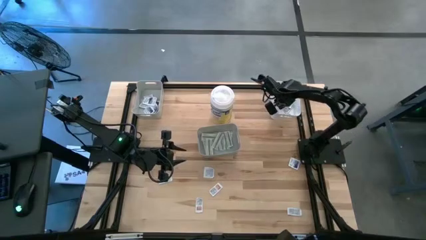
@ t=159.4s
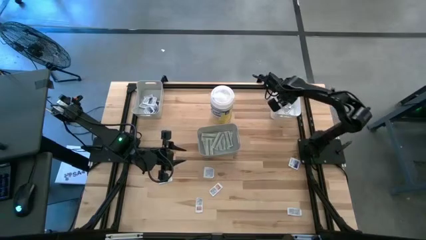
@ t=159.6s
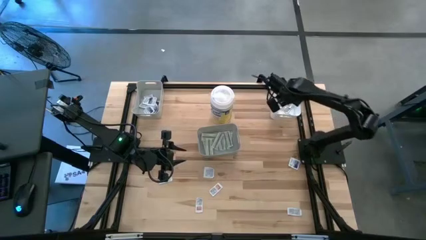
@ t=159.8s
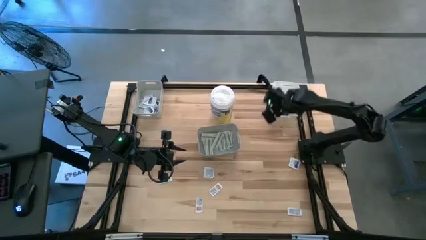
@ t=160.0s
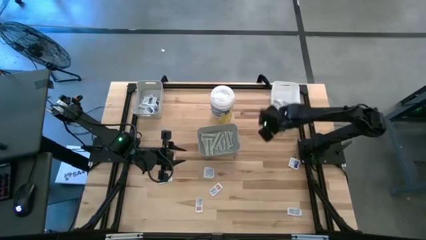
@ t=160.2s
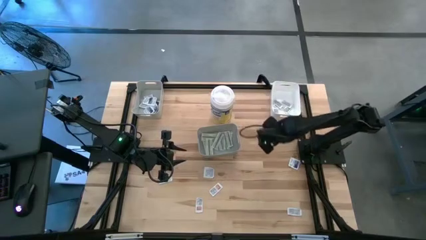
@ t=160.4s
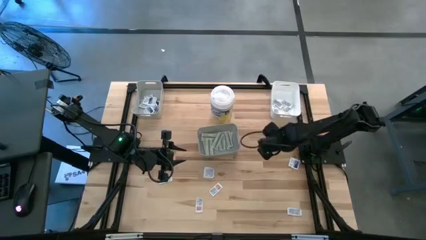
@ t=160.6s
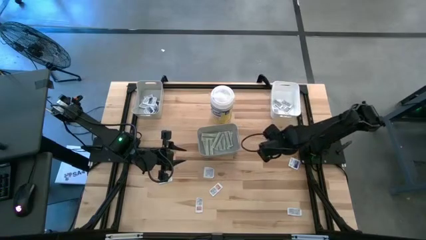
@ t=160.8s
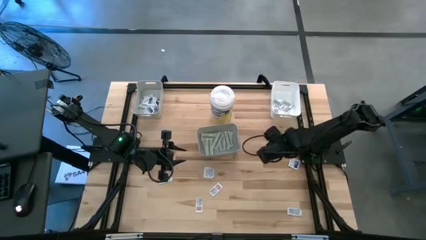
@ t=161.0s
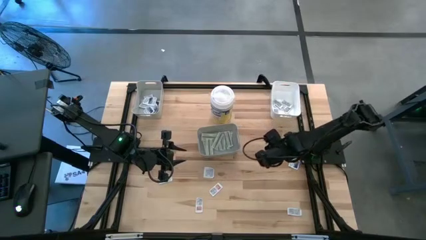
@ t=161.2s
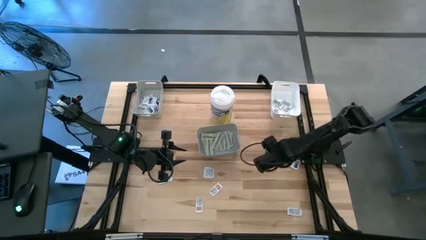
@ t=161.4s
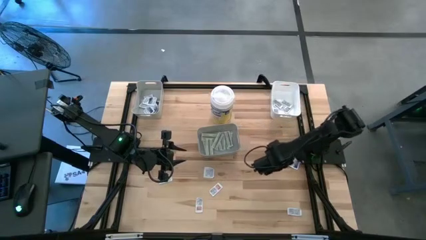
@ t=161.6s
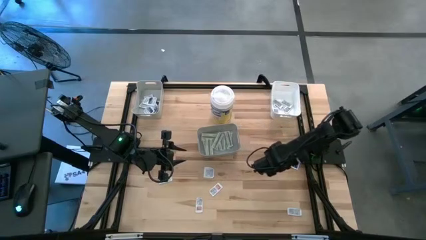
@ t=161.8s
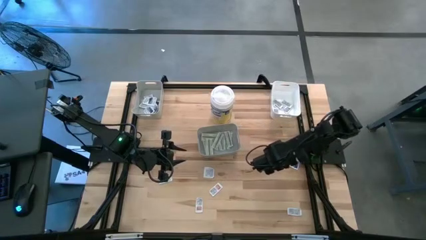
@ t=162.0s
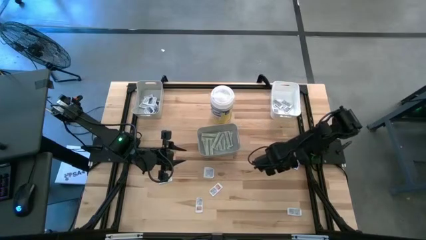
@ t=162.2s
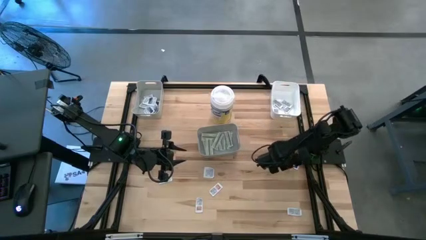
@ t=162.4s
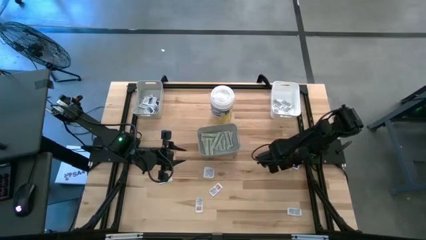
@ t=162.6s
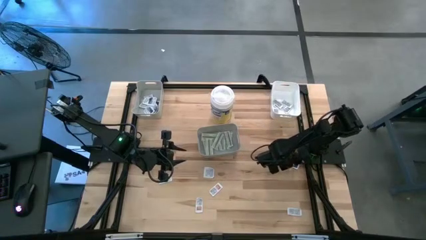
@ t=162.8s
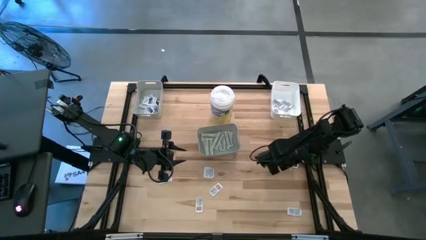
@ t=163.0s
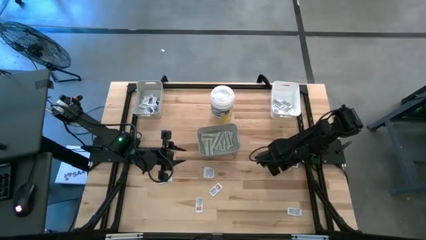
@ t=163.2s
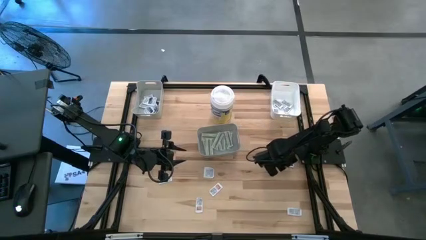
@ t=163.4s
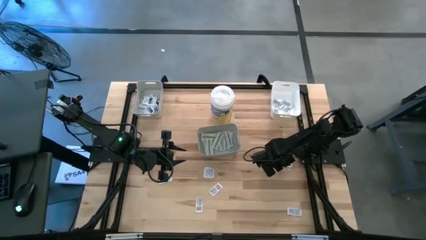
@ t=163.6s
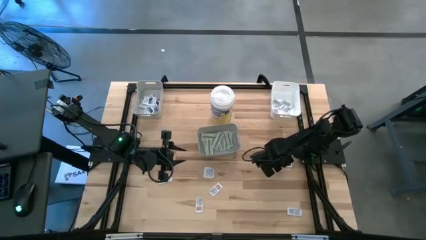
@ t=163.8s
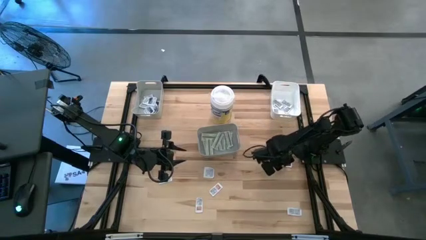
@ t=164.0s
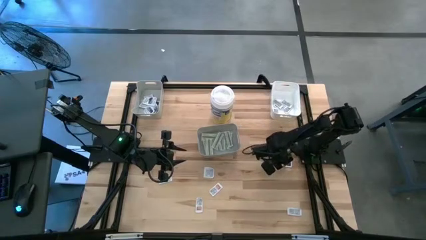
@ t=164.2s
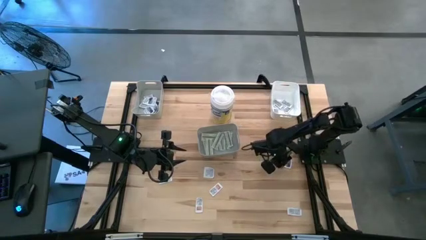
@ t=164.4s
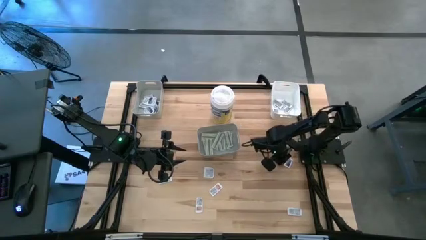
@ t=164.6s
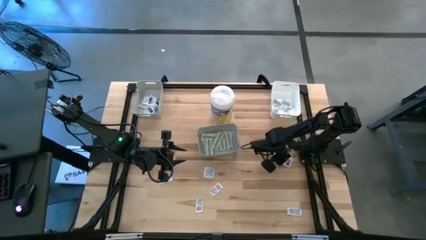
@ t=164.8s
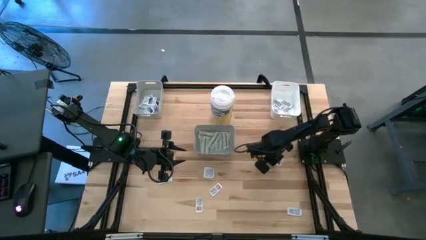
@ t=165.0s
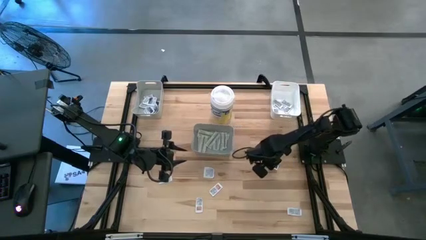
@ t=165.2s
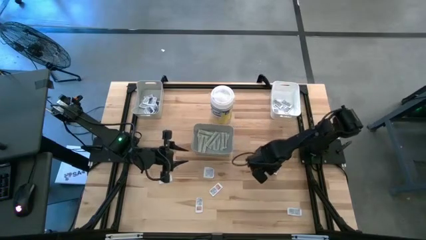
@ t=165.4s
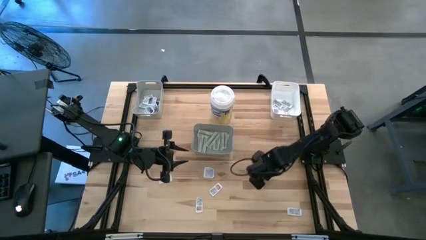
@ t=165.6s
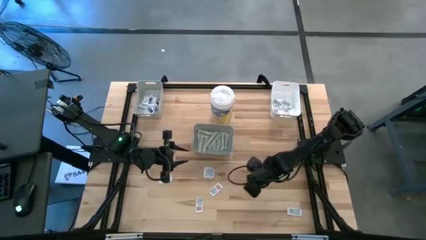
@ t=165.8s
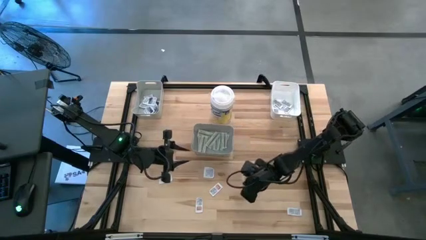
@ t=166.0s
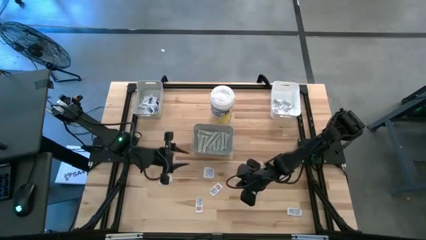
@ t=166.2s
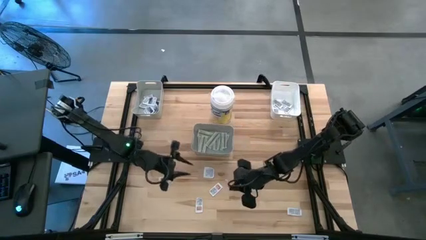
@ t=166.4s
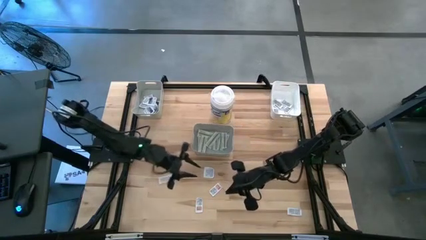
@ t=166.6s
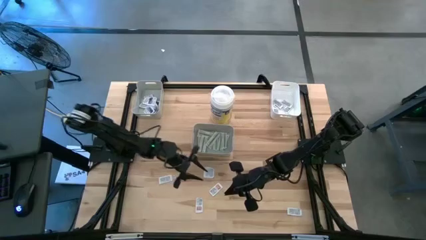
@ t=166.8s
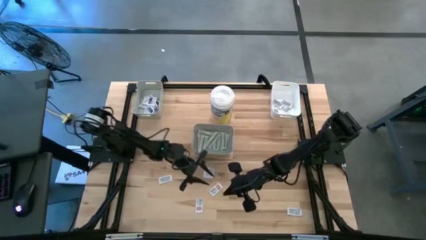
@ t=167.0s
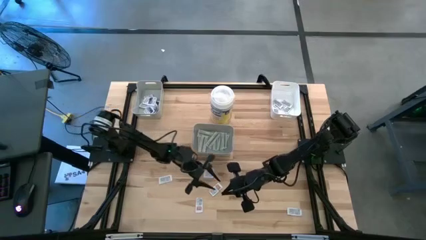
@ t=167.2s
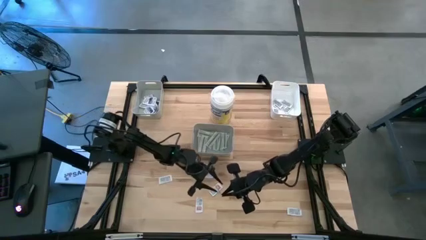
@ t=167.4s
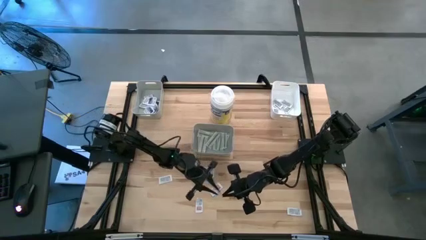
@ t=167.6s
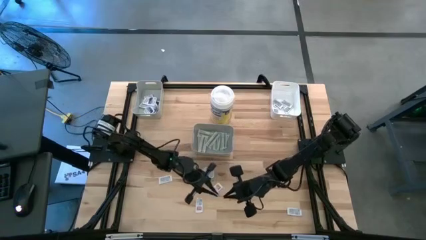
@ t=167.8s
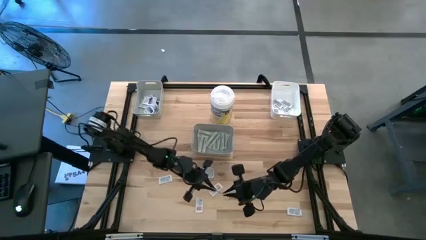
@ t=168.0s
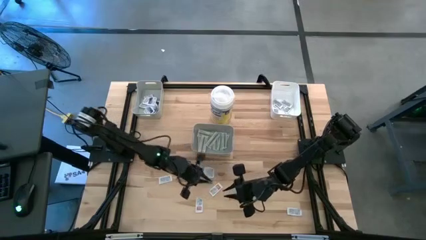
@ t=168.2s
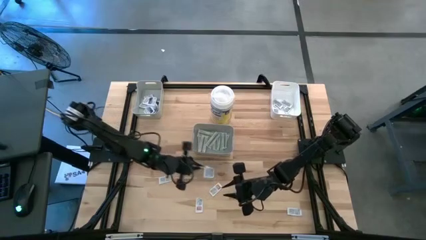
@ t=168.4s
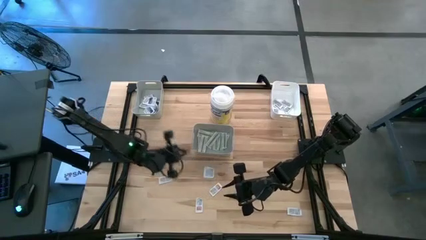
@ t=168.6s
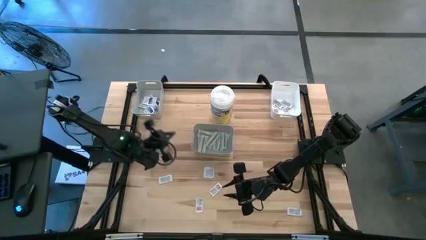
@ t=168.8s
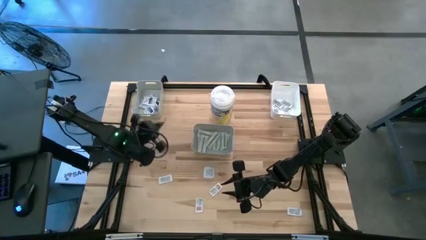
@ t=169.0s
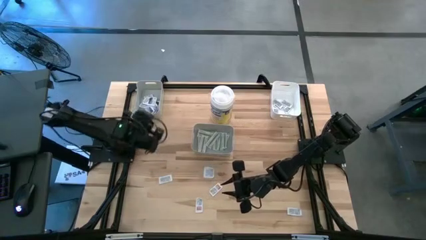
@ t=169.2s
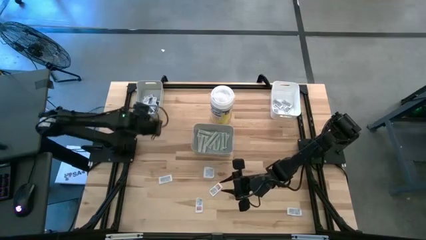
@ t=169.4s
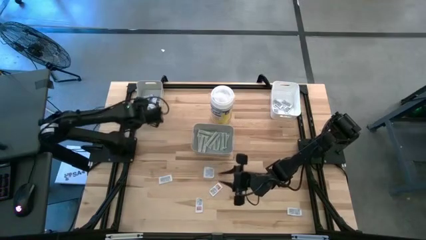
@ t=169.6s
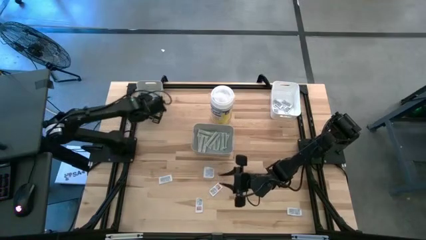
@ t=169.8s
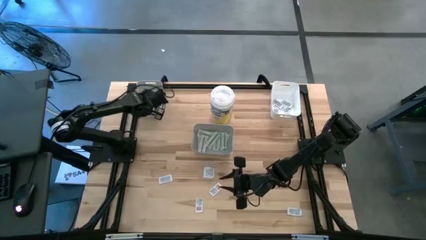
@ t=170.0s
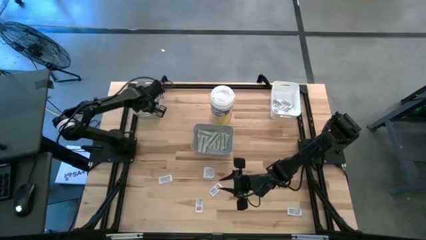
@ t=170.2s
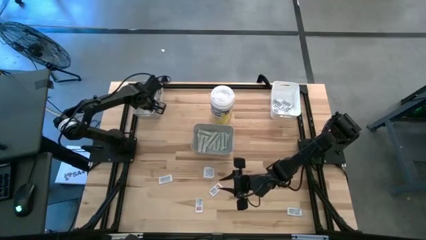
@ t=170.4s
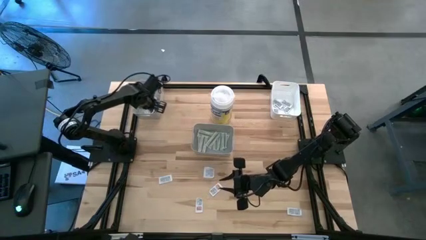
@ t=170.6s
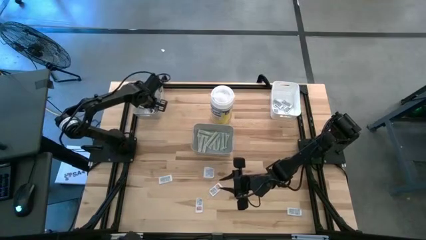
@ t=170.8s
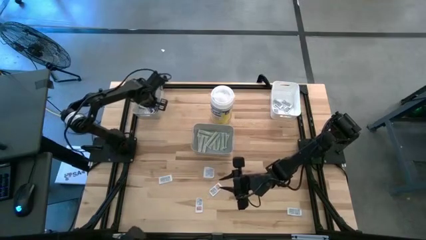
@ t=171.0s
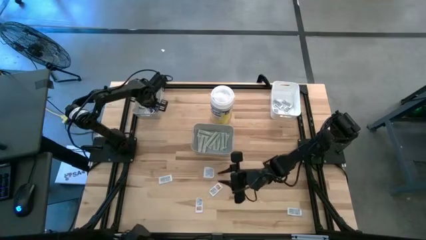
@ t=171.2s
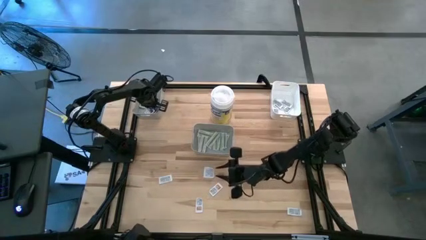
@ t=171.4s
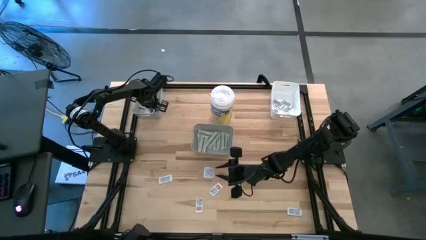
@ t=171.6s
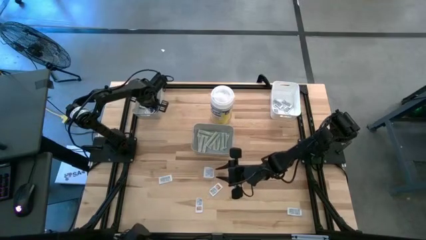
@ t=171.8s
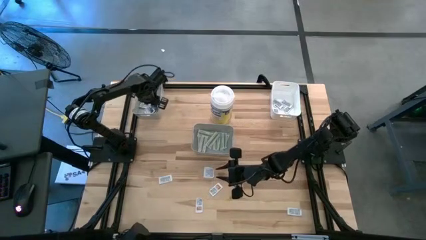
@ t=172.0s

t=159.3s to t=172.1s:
Task: Pick & Place First Aid Supplies
Put the alcohol pack into the top gray bin
